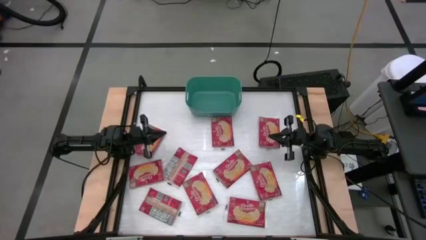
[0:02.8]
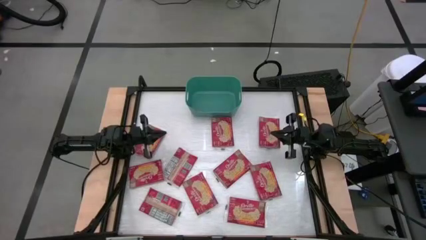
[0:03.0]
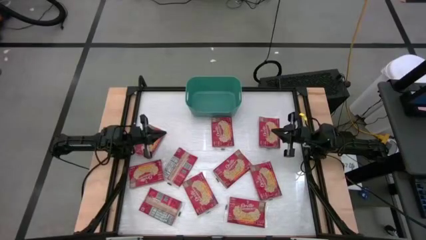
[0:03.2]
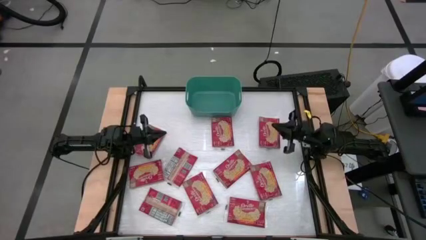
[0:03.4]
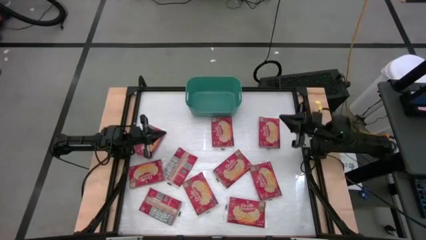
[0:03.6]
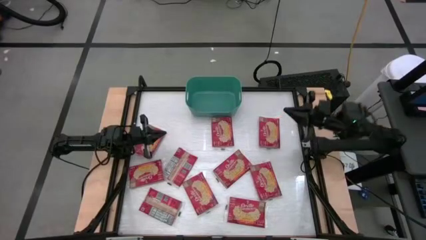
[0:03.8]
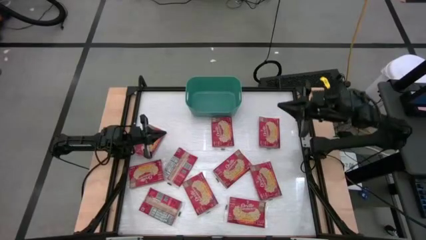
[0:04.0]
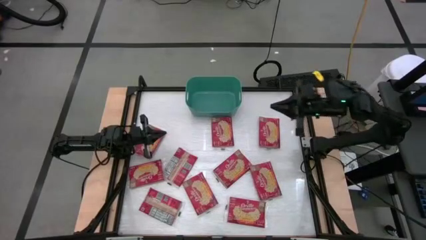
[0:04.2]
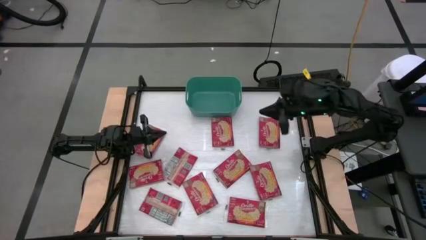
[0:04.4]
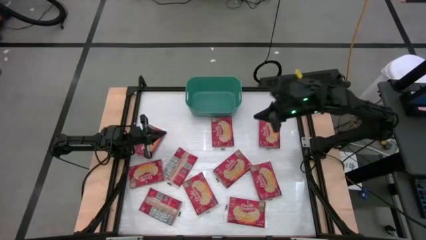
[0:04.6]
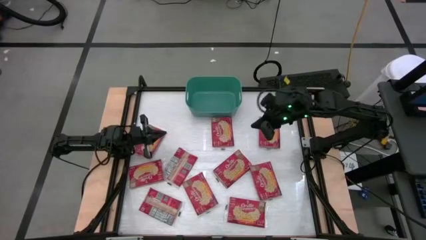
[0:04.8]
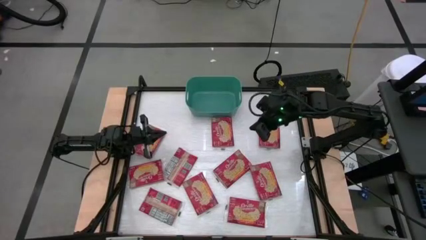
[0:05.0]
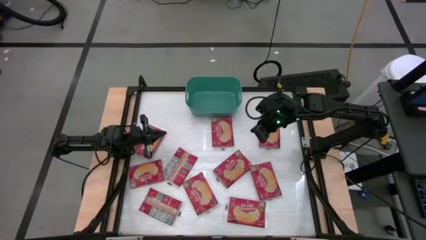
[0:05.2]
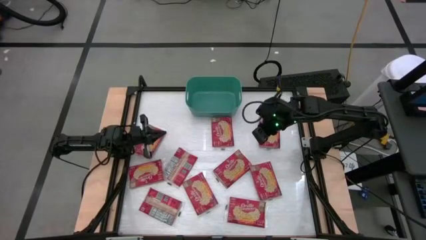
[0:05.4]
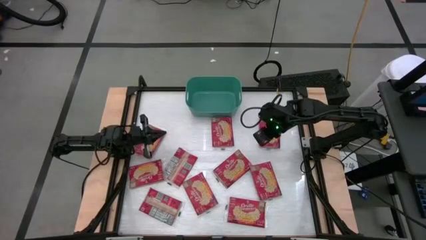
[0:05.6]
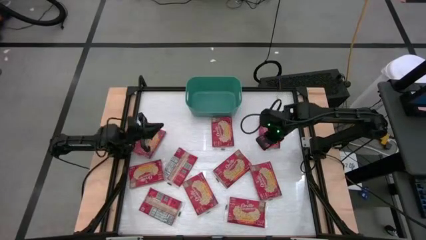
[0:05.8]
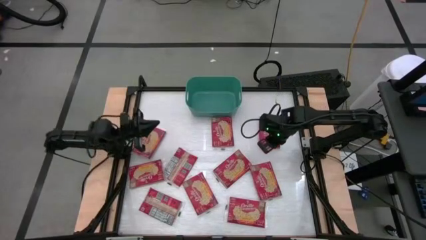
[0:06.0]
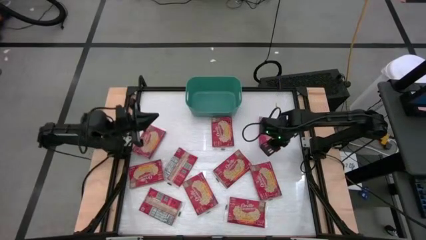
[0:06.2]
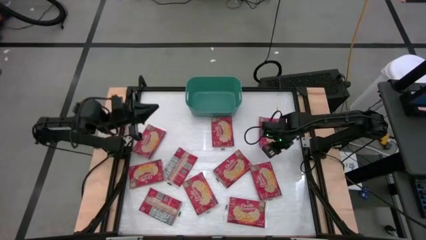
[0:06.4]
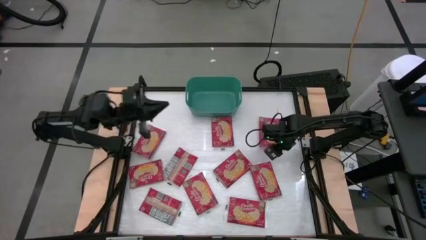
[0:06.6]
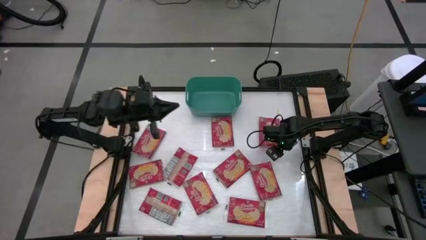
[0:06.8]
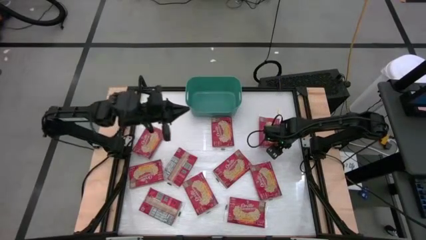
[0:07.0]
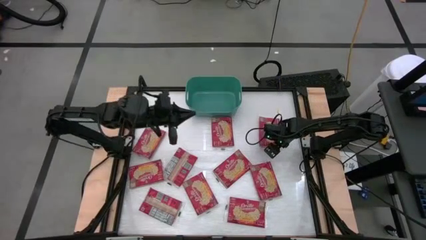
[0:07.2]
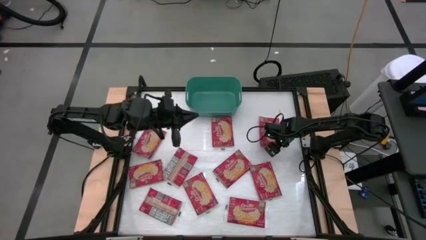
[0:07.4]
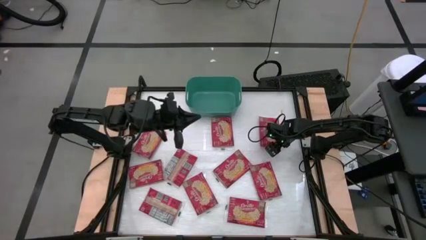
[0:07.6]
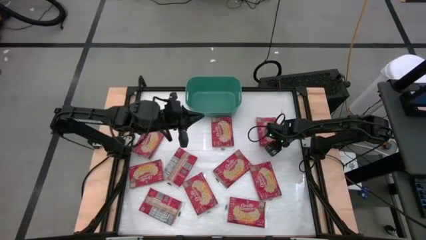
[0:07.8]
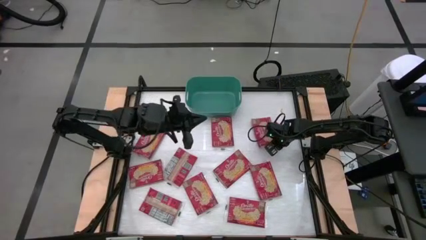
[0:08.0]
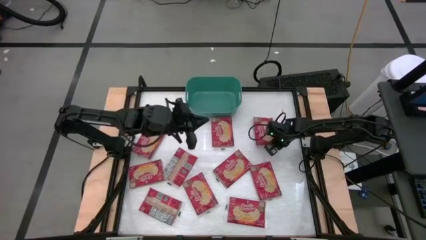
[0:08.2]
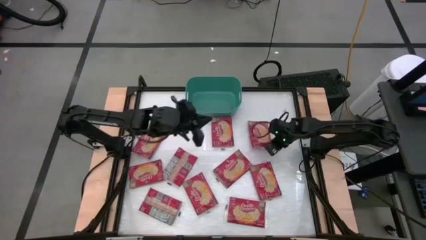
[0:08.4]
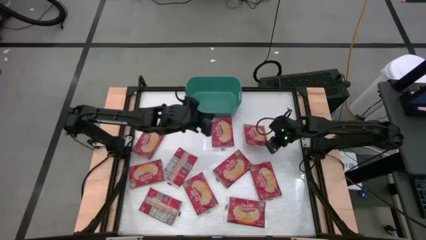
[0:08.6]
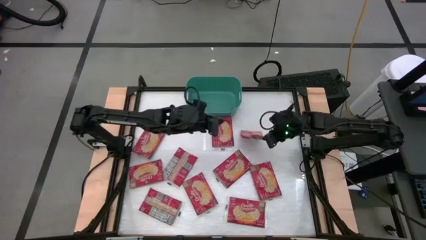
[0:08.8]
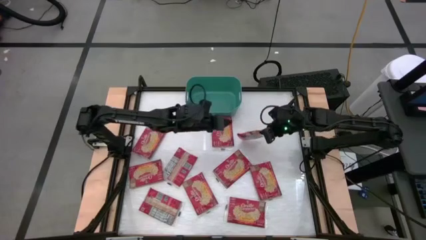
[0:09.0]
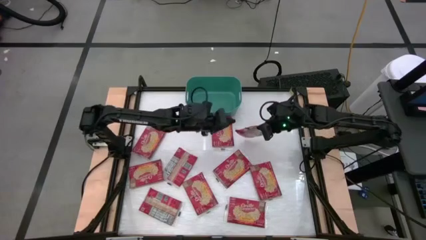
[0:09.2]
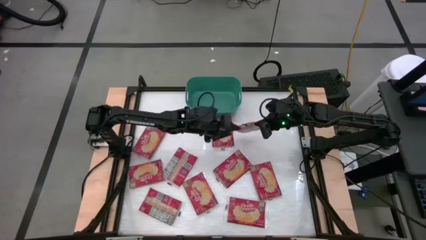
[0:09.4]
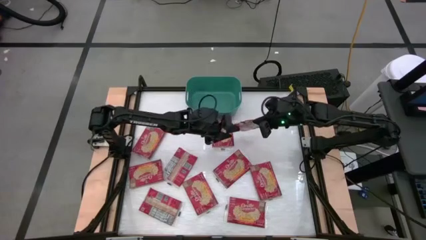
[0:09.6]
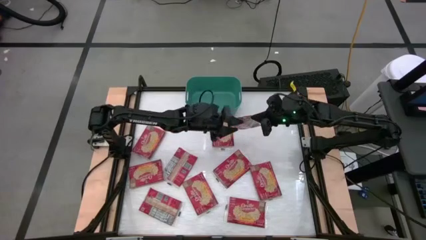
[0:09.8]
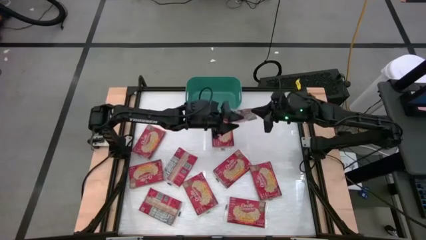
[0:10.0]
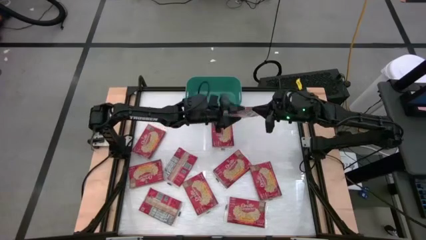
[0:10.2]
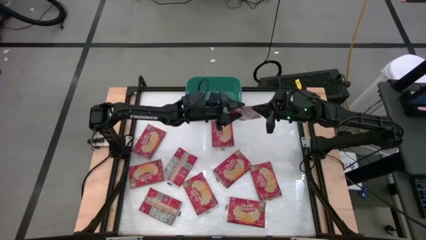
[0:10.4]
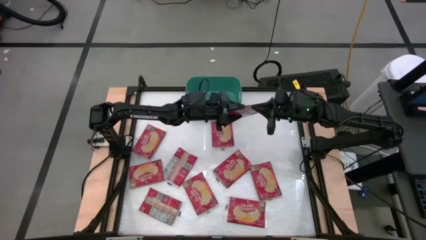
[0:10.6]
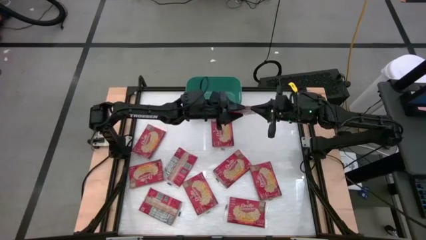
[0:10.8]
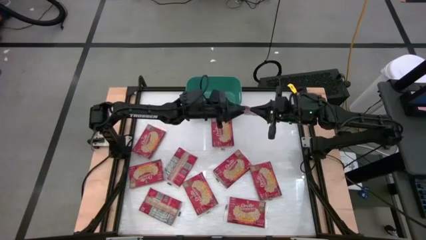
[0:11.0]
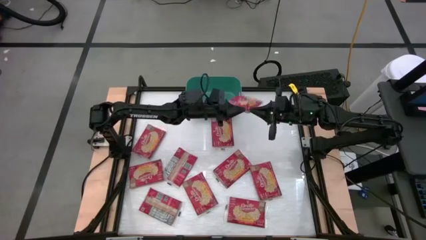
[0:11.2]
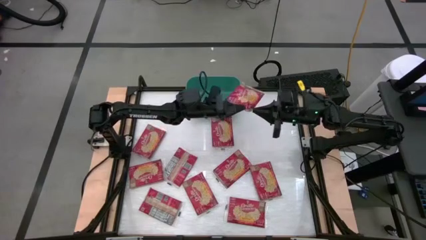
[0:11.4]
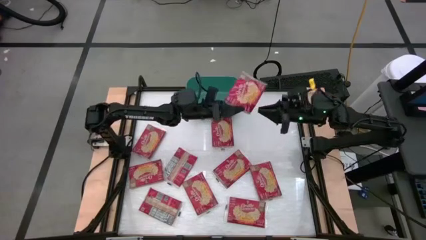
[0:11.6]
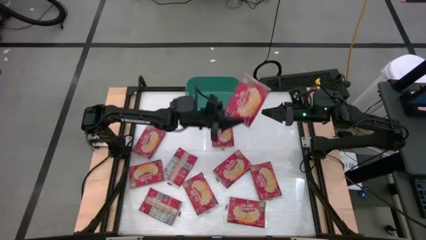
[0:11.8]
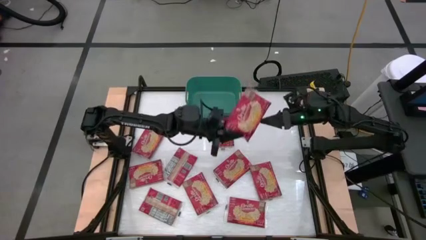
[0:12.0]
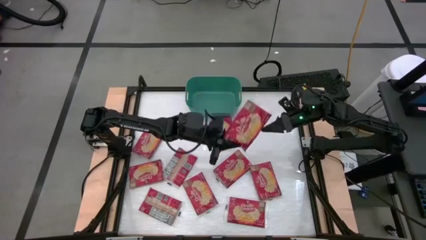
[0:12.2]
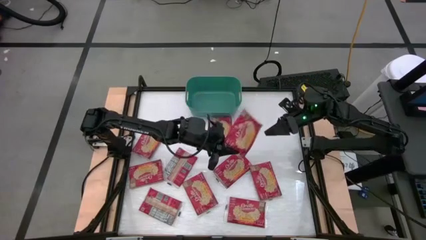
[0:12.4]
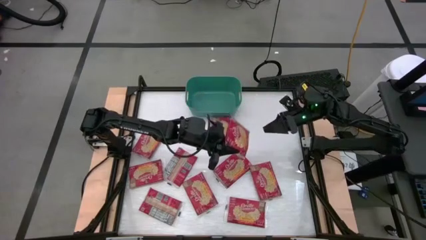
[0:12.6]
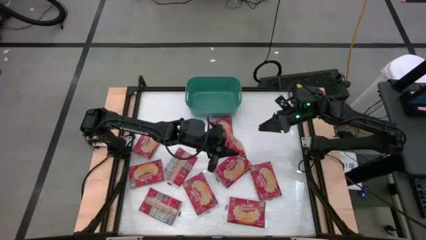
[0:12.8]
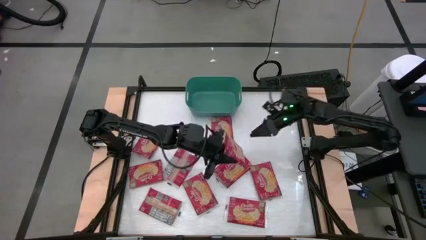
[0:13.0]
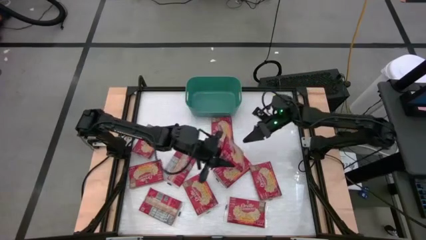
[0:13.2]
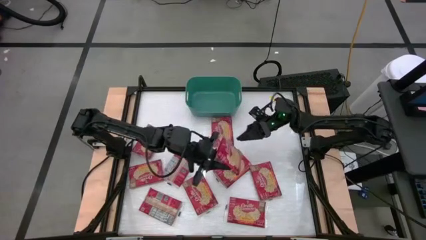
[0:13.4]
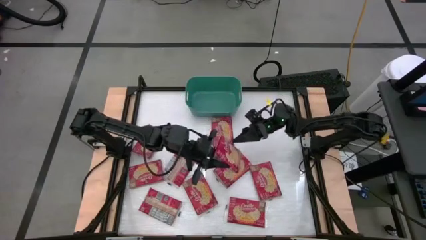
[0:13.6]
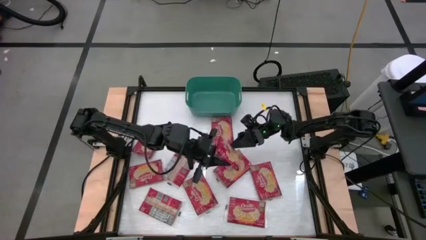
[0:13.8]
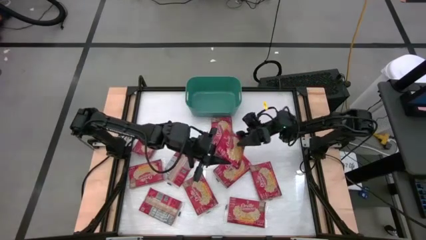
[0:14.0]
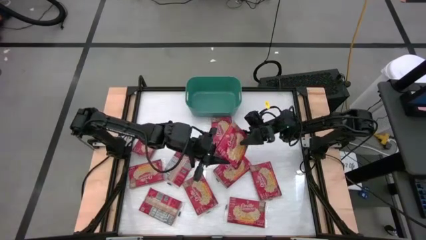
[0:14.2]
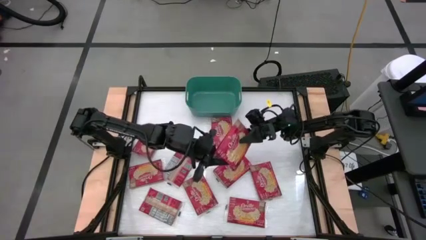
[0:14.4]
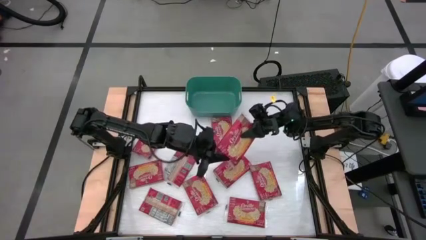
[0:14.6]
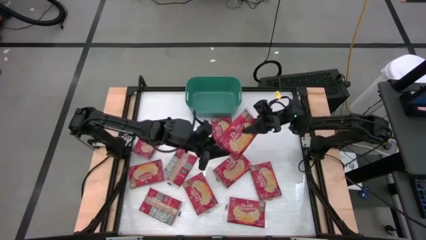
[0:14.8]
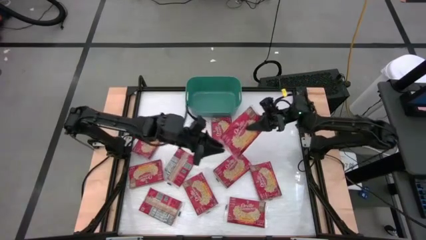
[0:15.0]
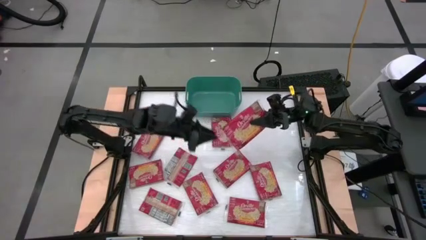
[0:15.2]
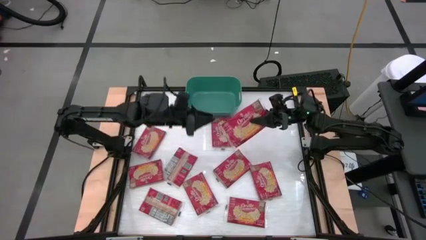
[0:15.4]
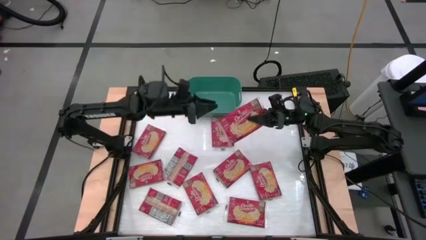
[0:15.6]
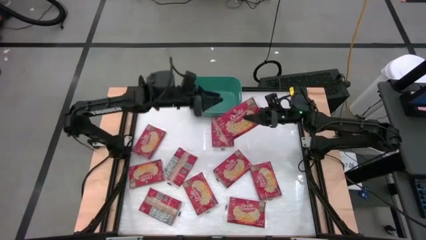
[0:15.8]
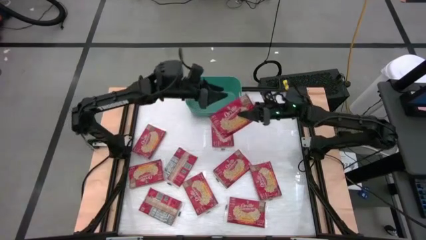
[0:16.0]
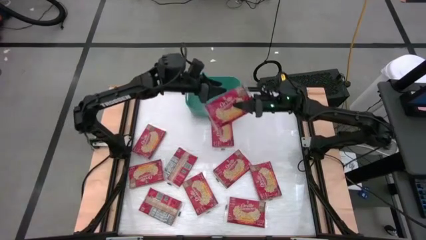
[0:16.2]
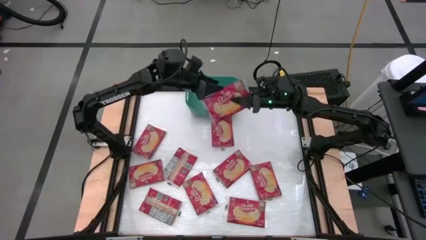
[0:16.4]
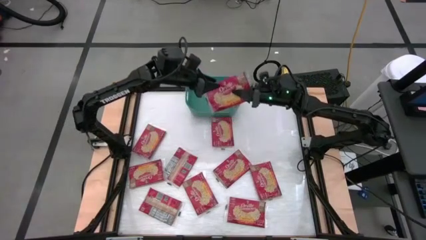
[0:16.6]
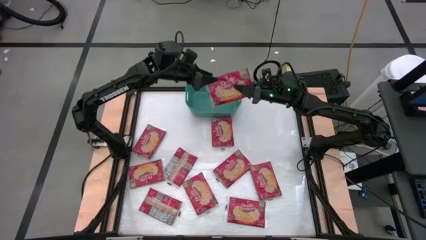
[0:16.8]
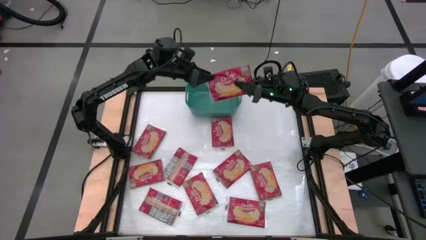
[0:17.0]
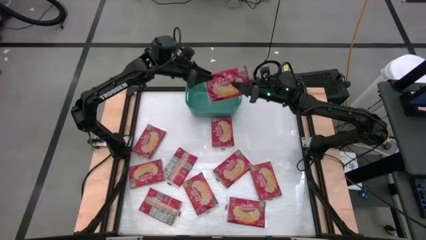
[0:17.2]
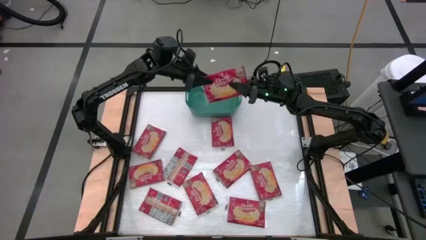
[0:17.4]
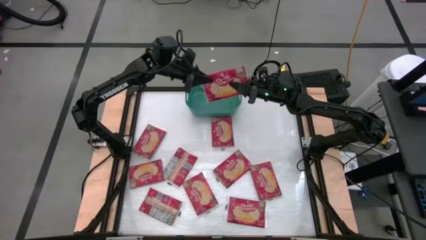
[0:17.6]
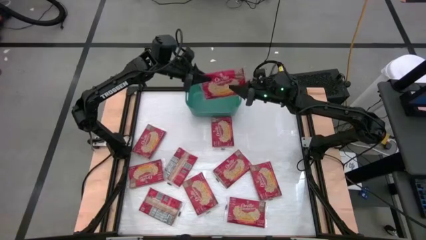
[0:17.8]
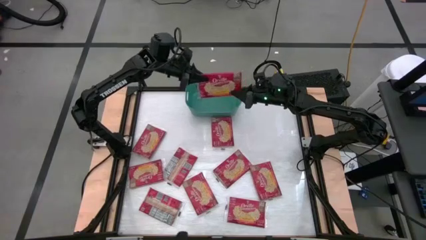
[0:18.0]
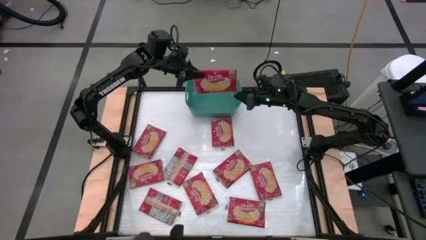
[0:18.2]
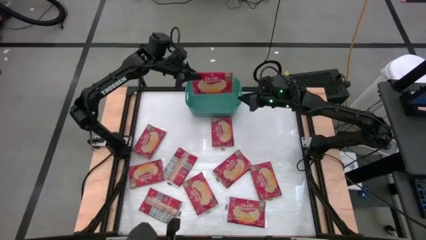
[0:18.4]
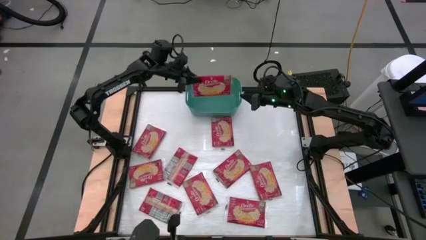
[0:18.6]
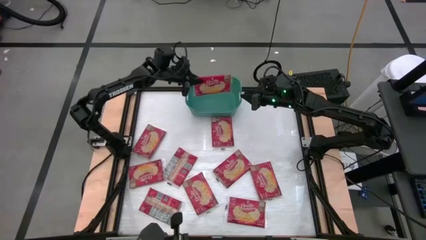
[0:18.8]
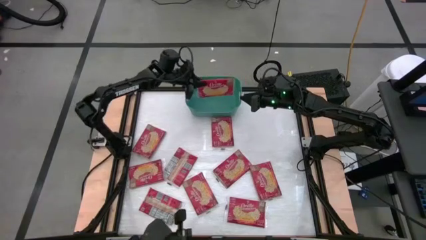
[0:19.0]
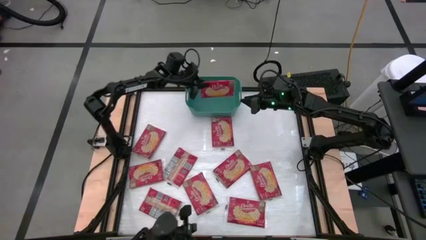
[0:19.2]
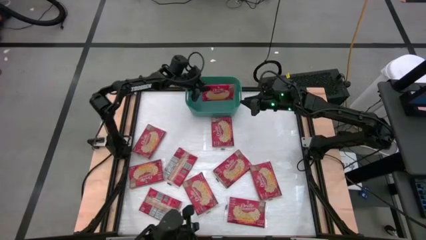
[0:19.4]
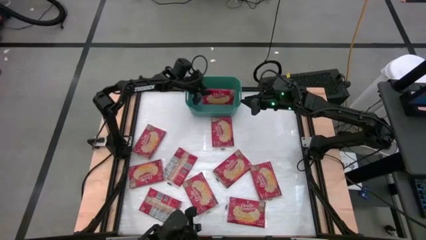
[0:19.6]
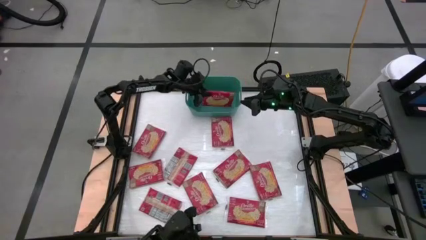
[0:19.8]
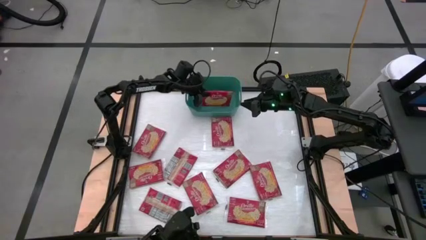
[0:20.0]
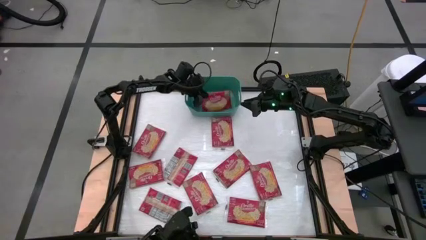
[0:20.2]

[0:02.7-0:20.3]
Task: Sort popcorn bags into baskets
Put the popcorn bag into the green bin
